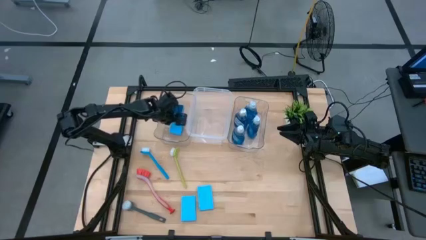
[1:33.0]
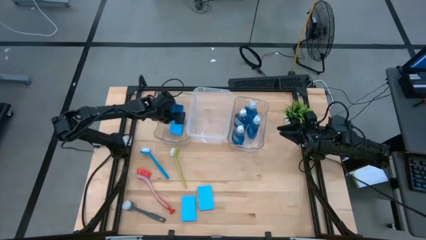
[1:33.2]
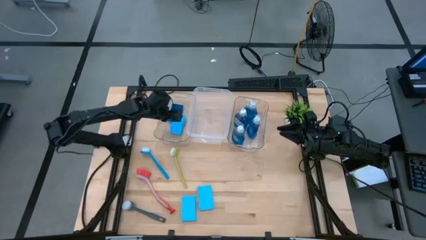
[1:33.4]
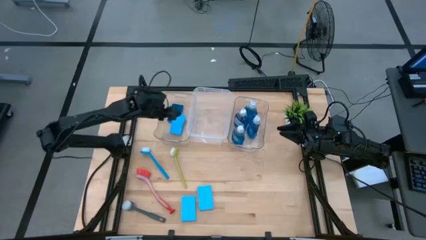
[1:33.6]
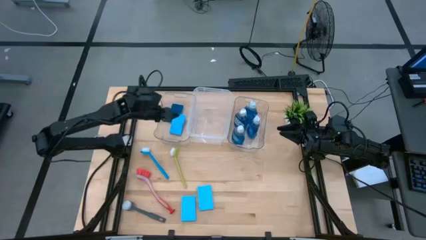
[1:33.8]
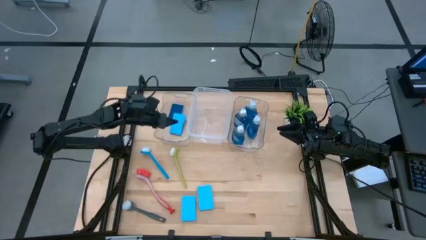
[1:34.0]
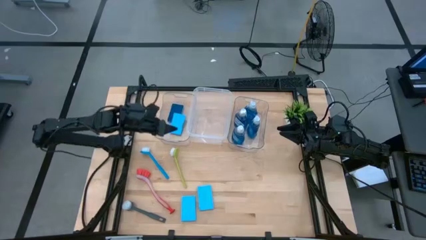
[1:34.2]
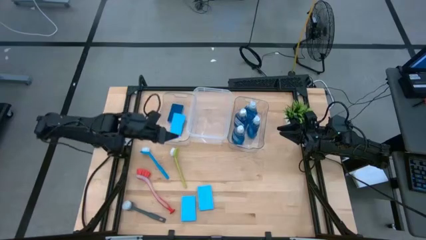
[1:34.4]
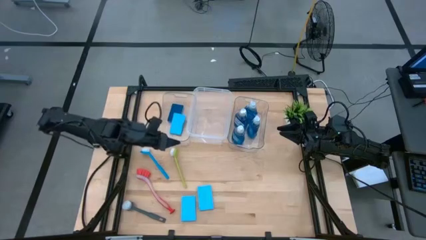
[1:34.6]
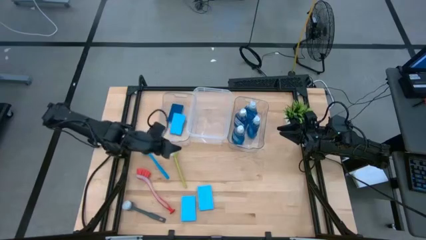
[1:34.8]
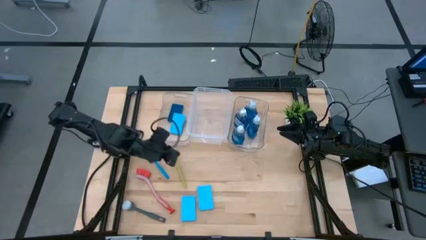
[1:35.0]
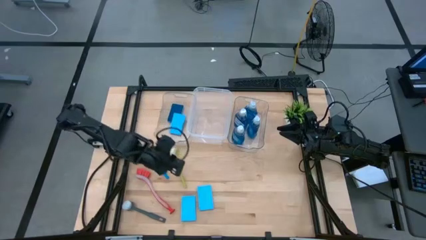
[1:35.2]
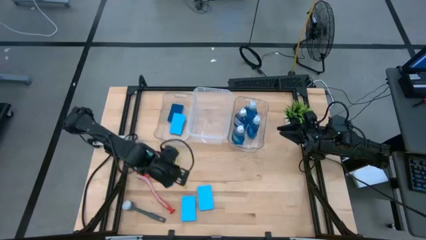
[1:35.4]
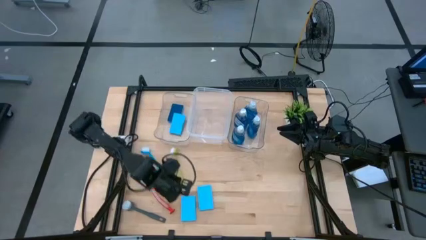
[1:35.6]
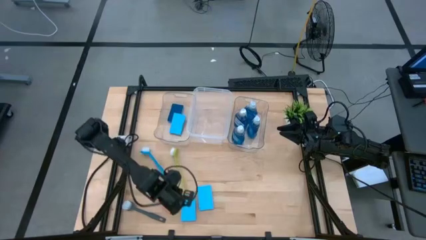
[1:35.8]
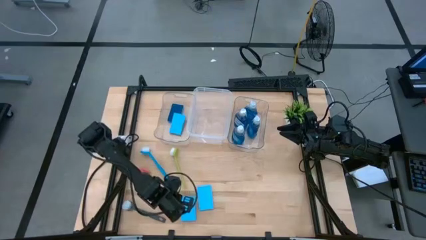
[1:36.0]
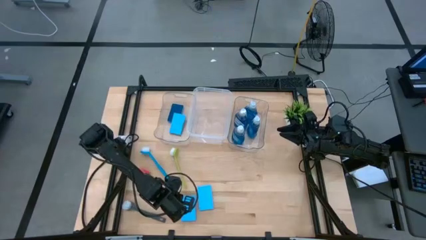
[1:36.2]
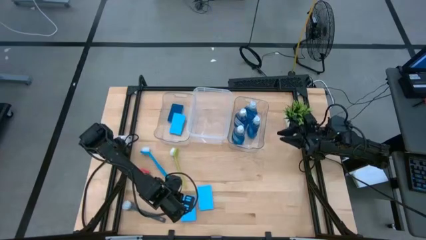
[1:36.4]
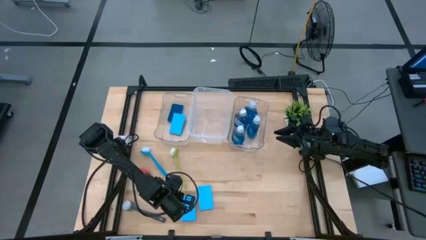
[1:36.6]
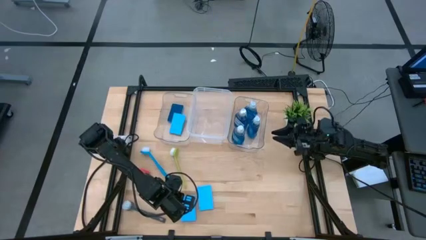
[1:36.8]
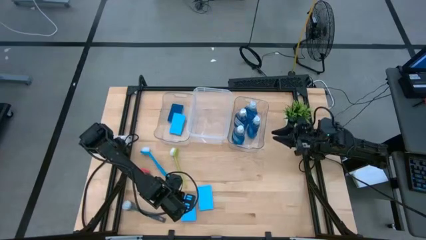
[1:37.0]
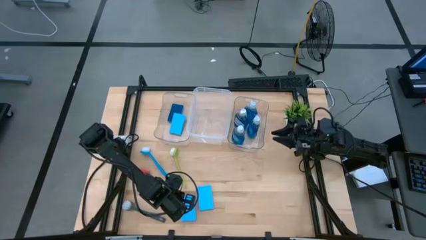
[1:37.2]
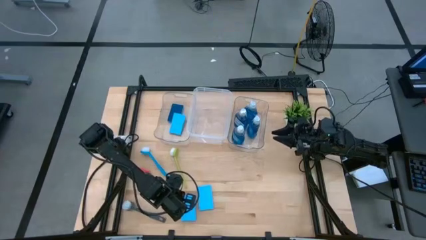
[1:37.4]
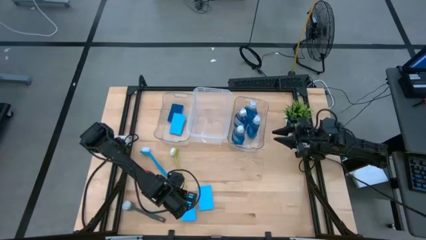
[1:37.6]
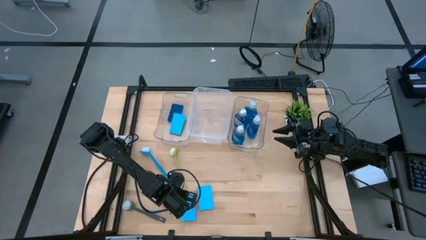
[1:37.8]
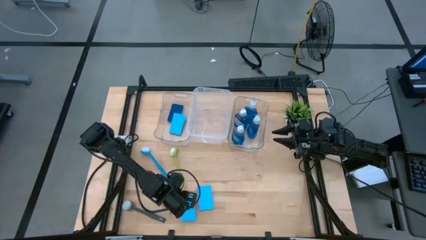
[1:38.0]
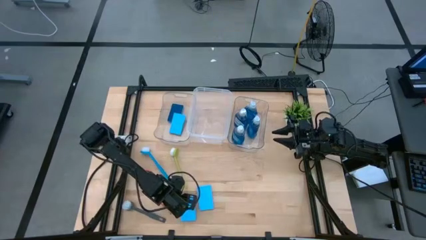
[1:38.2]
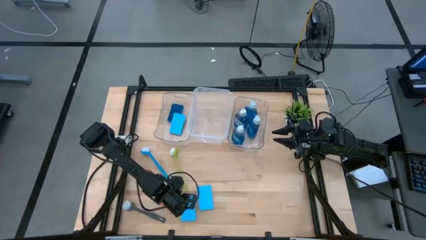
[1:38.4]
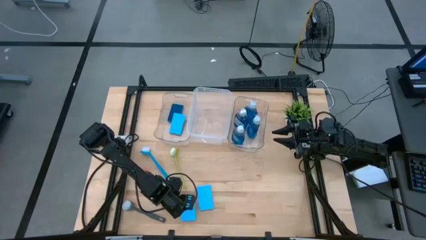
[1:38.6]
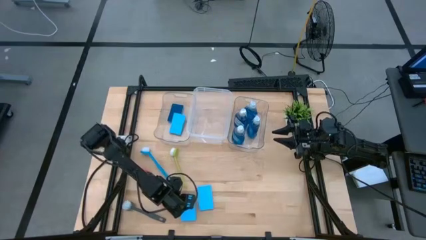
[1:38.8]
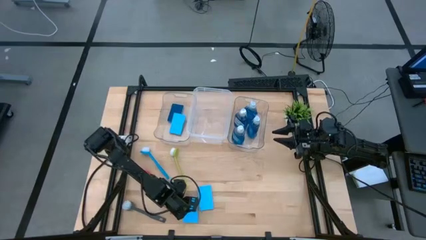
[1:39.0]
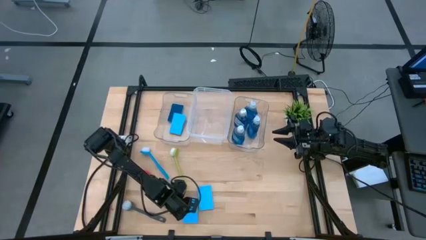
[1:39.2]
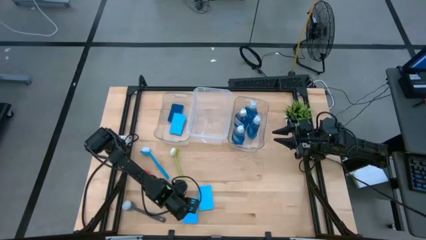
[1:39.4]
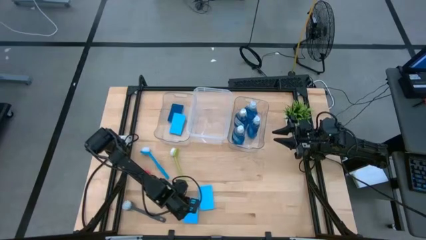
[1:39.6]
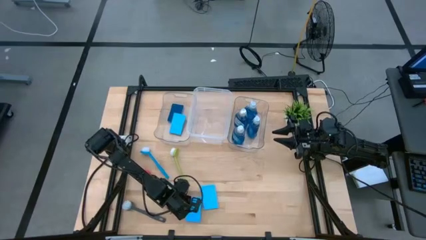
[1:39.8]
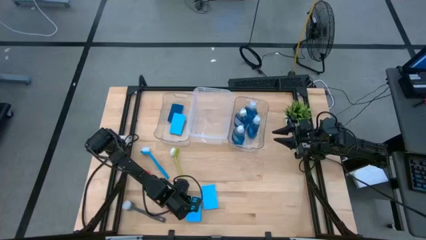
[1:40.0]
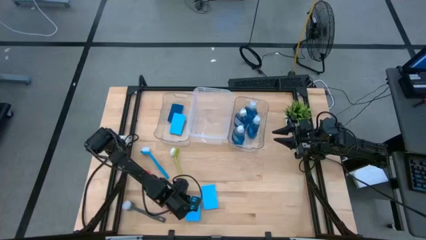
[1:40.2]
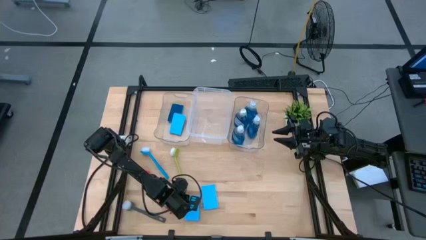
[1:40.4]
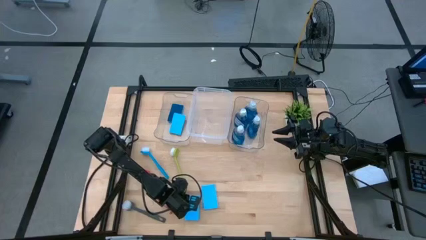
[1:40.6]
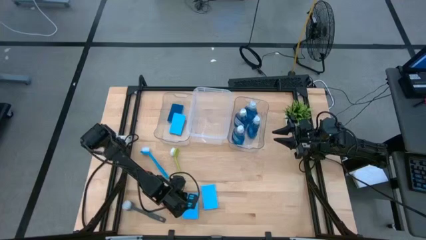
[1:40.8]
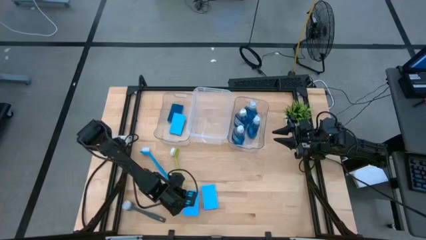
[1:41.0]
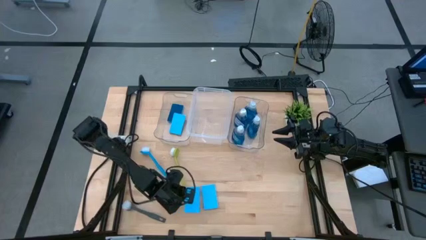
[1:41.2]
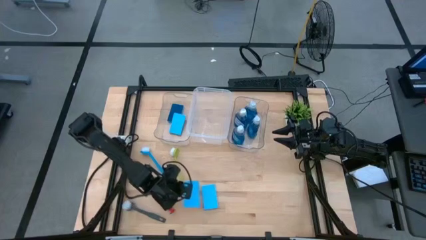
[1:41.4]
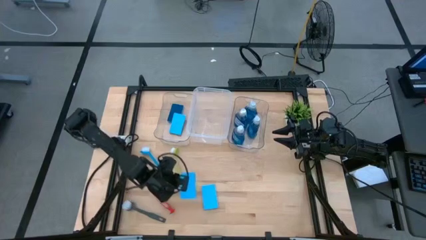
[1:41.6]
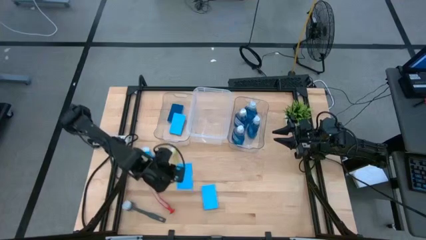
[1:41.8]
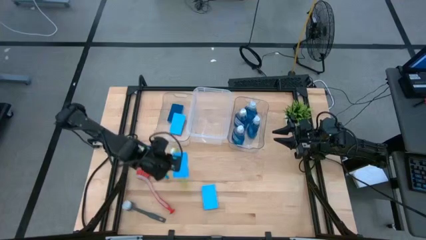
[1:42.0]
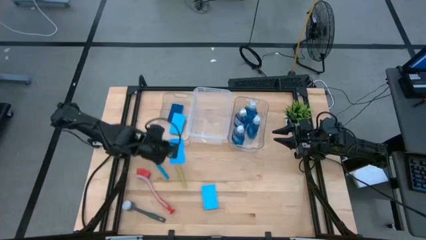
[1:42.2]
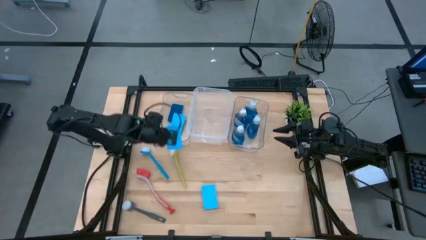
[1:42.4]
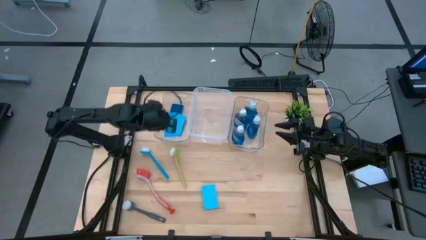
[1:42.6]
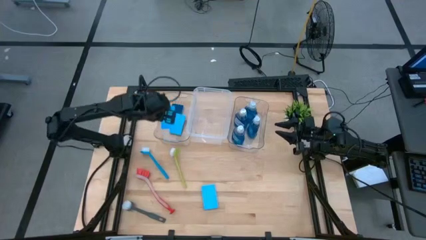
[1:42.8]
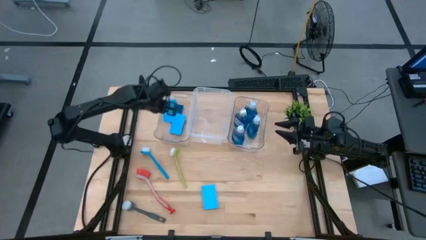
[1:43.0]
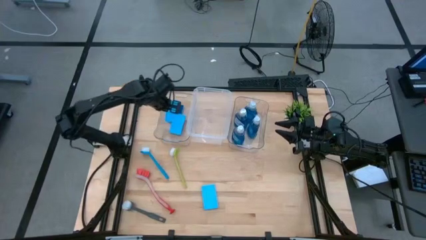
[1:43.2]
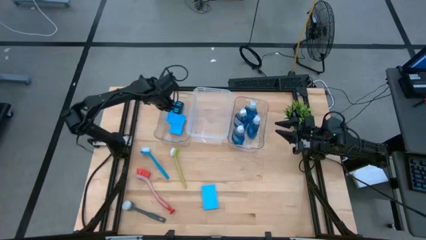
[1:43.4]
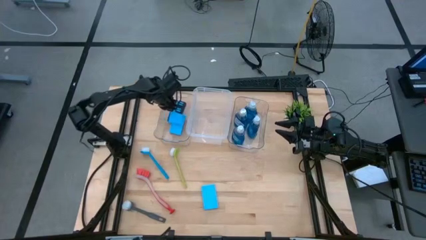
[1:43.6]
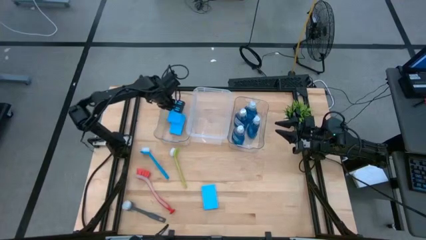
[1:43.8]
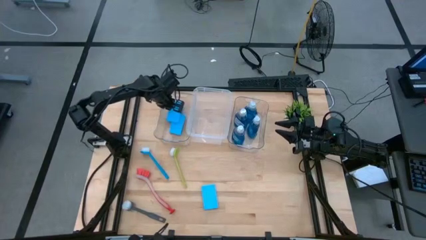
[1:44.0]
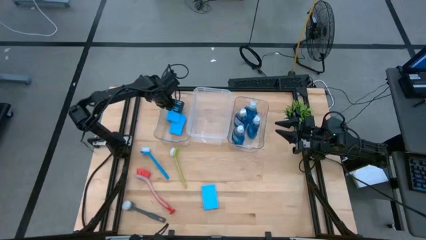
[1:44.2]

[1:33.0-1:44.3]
Task: Pick & Place Kitchen Sink Supplies
Put the blue sponge into the left transparent bin
